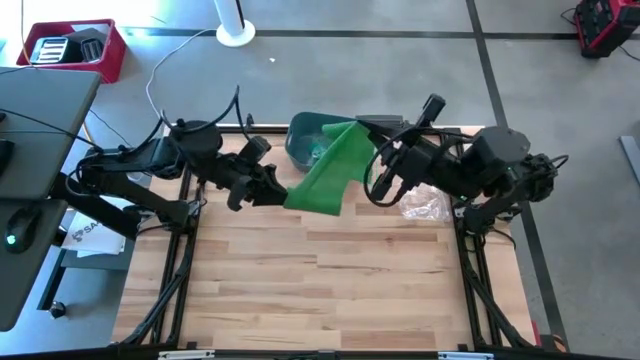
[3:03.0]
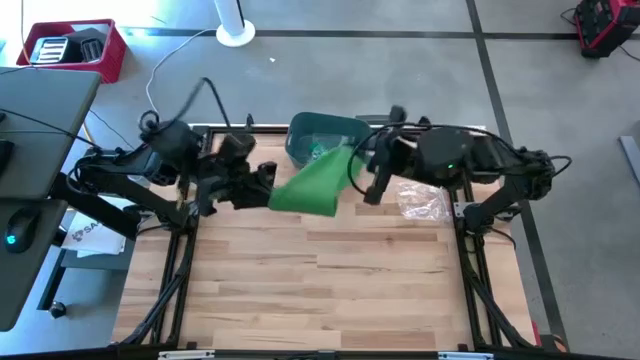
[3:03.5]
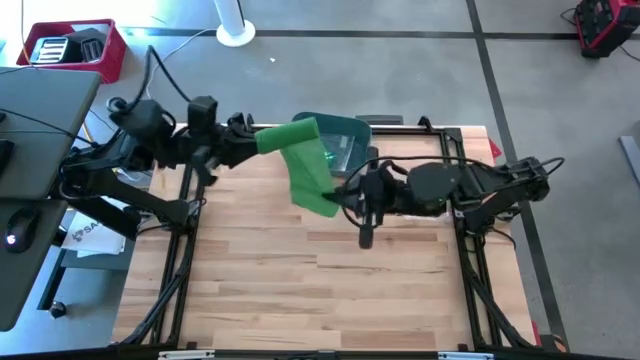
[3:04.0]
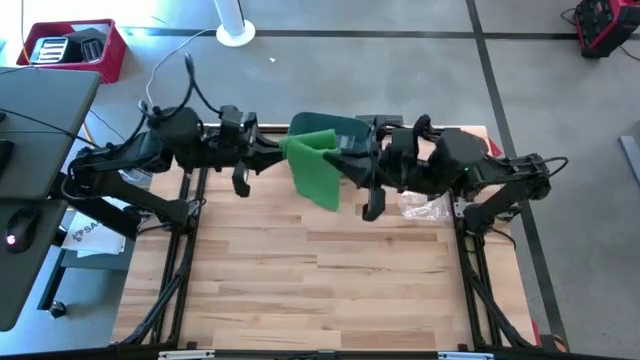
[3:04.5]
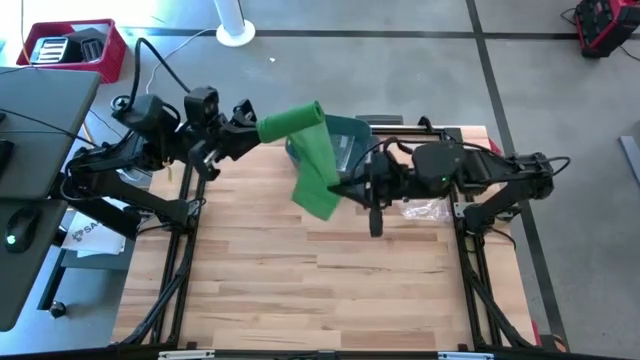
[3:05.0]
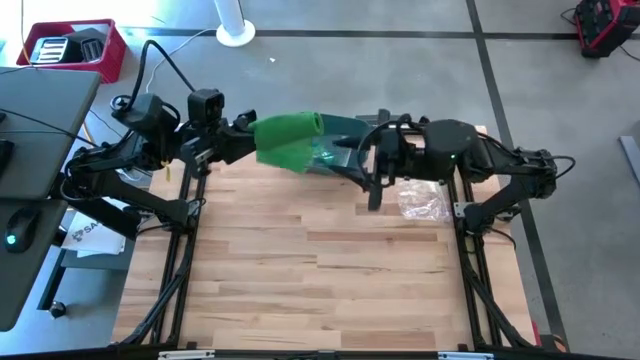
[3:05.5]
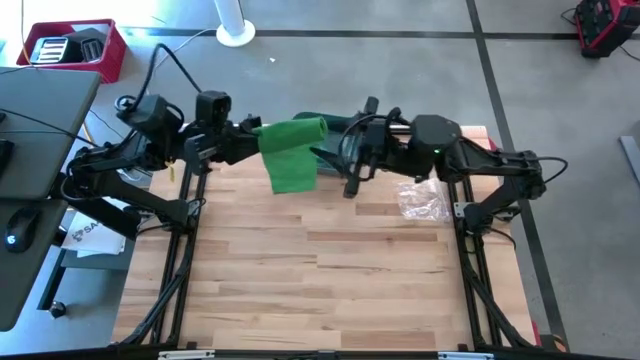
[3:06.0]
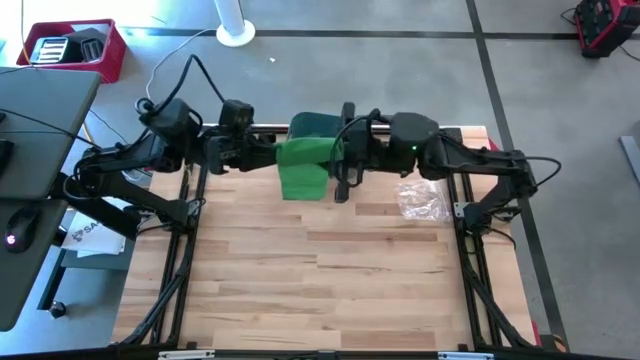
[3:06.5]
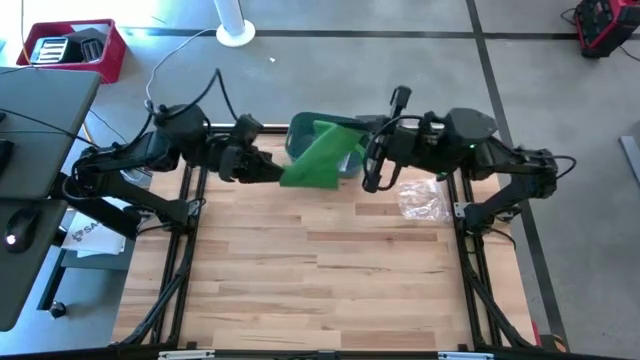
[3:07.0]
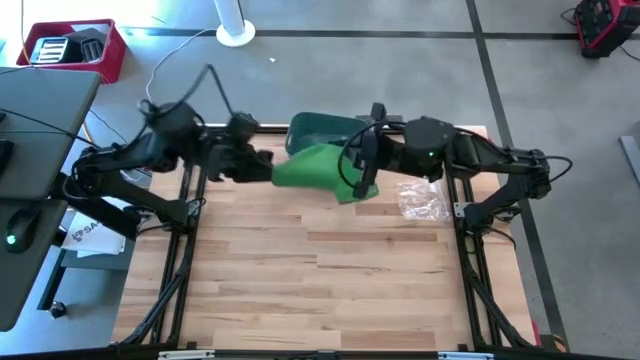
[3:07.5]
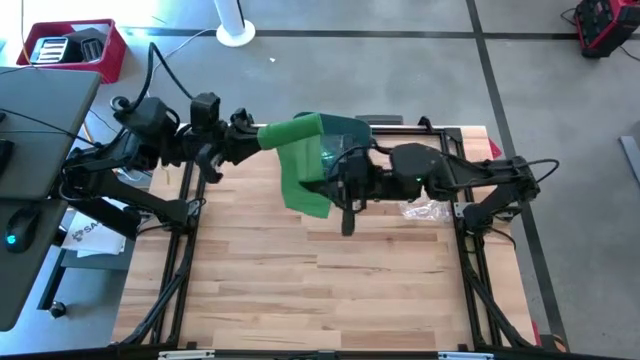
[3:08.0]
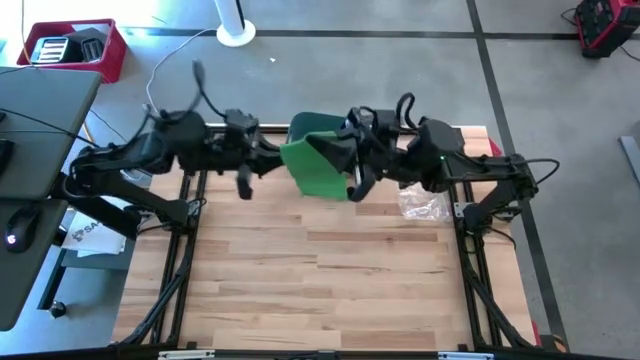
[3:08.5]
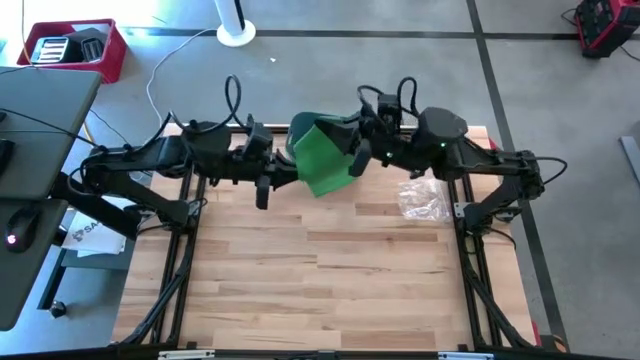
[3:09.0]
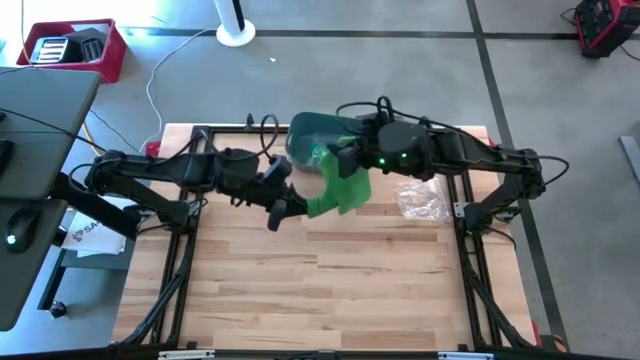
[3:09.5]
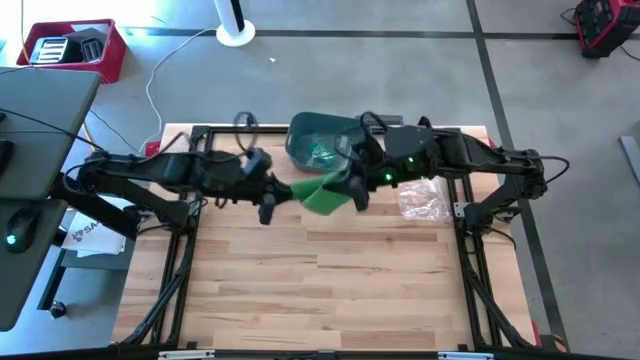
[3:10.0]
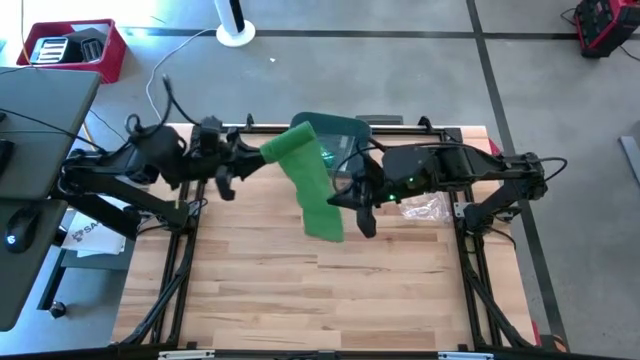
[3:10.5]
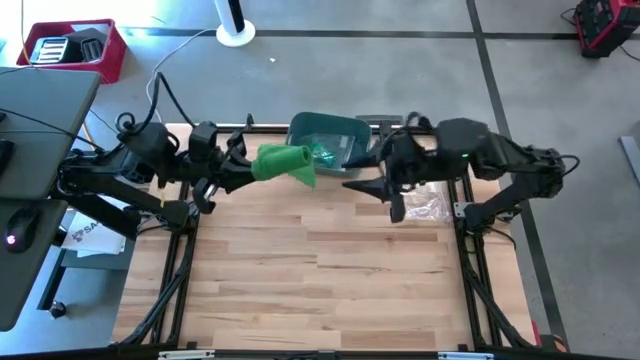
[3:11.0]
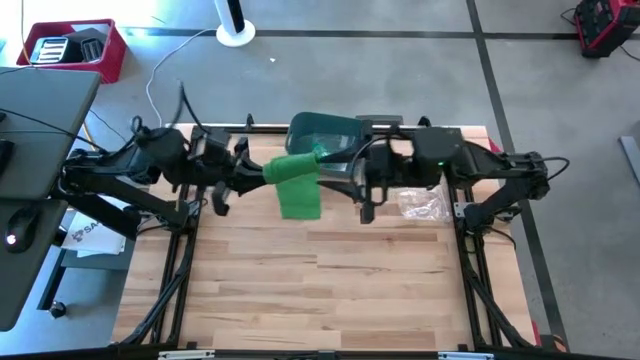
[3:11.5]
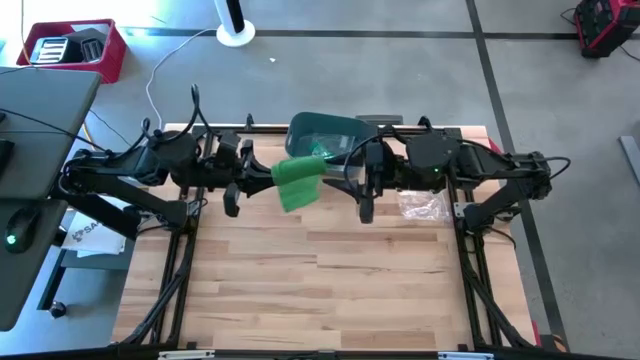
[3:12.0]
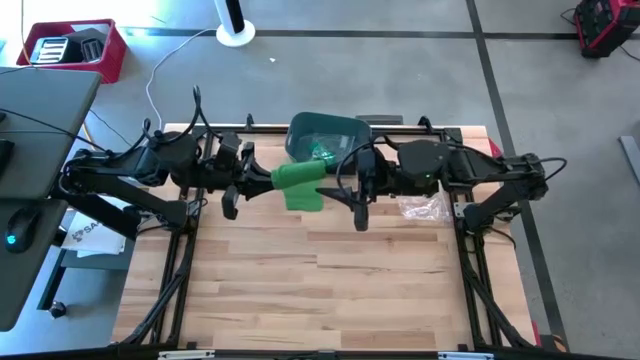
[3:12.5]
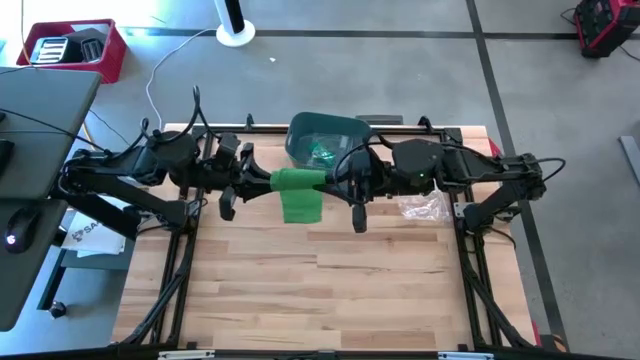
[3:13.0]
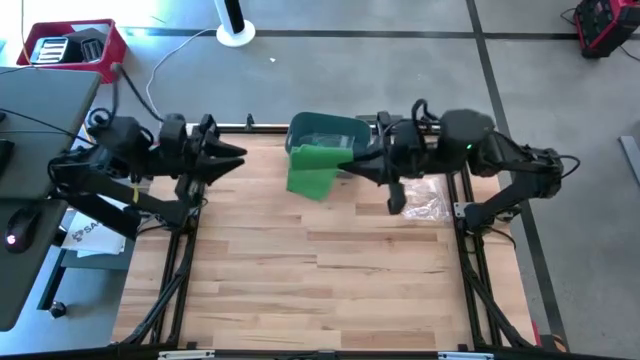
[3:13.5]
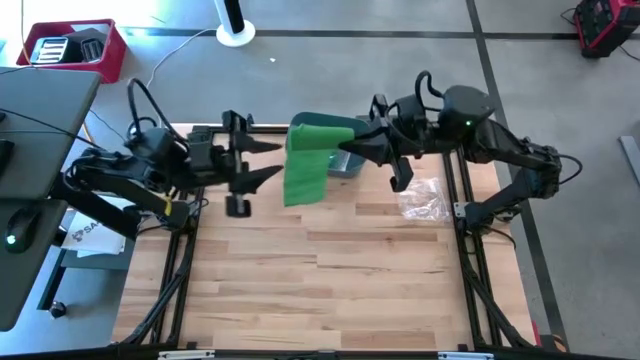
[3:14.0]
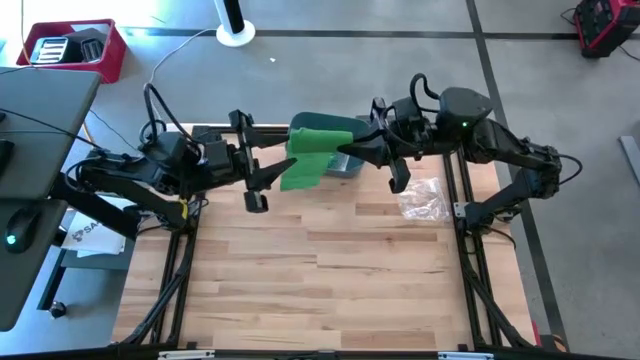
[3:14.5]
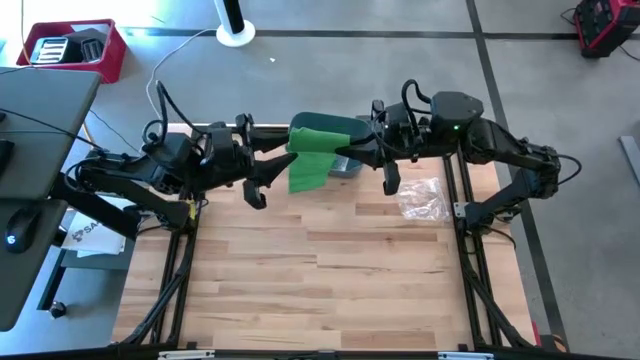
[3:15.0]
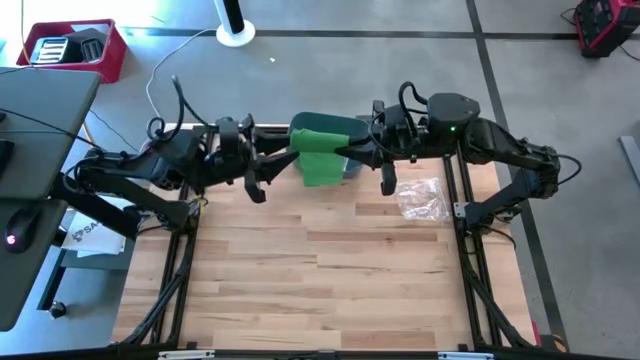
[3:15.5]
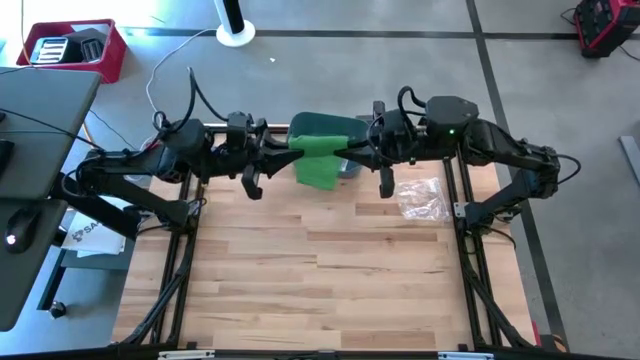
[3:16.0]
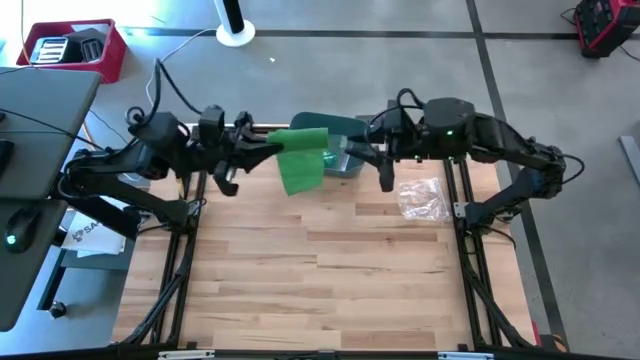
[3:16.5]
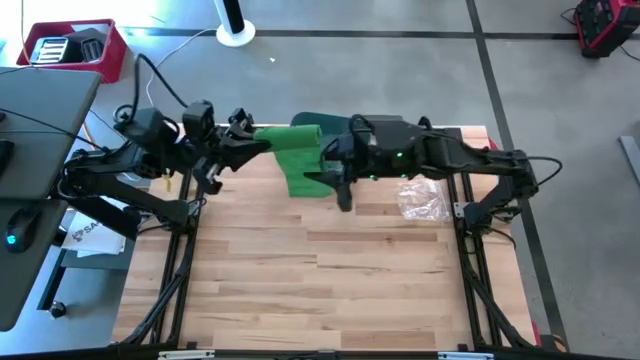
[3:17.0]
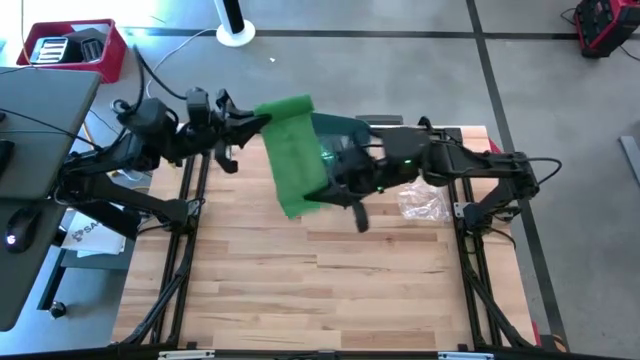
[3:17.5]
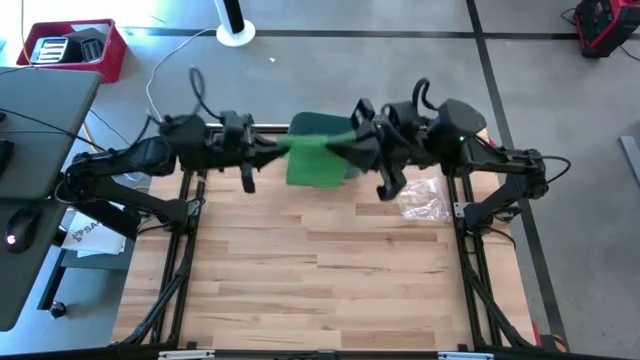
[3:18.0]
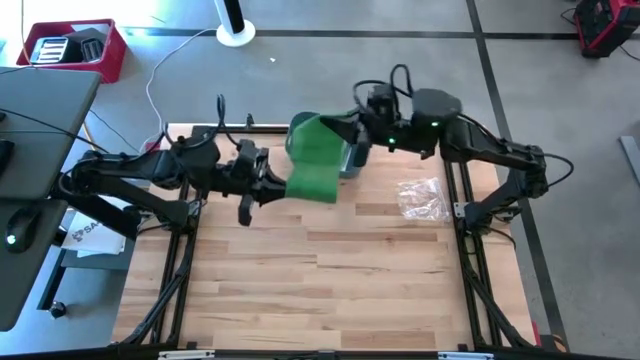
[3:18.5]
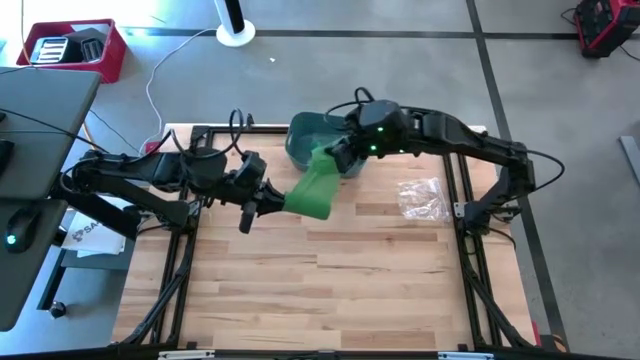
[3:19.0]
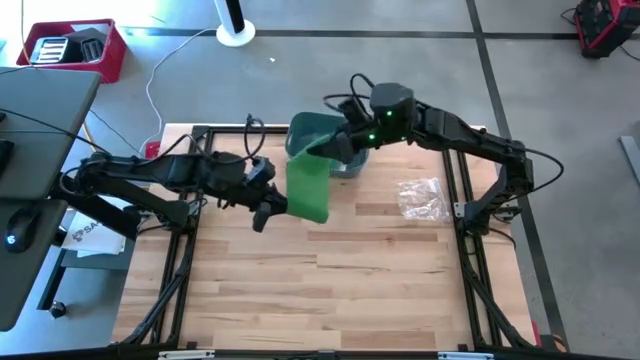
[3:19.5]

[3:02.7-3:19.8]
Task: Roll bandage
Roll the green bandage

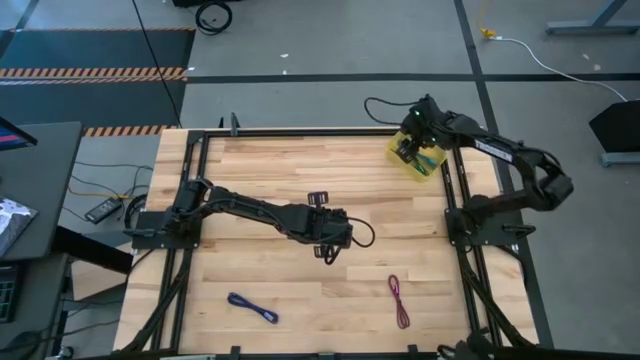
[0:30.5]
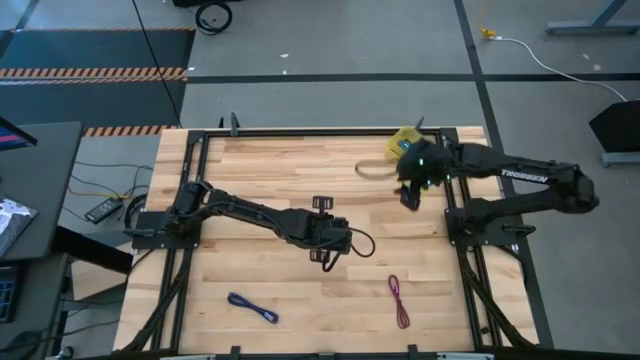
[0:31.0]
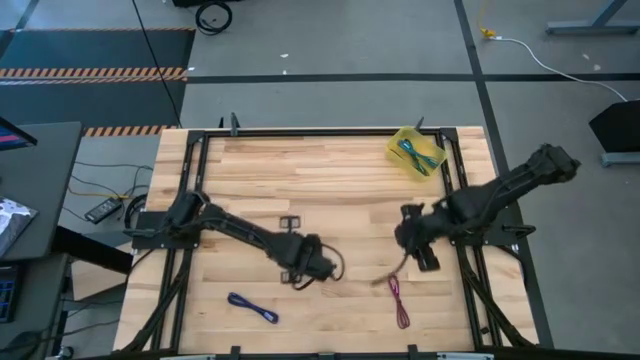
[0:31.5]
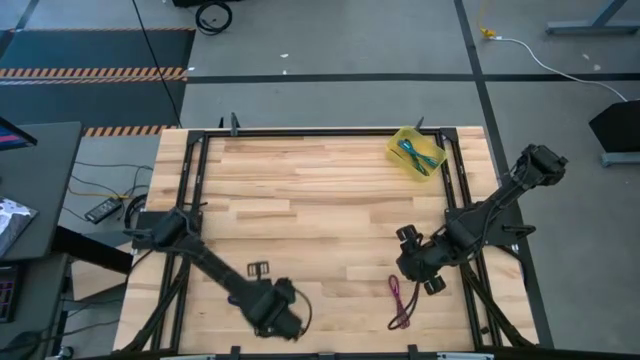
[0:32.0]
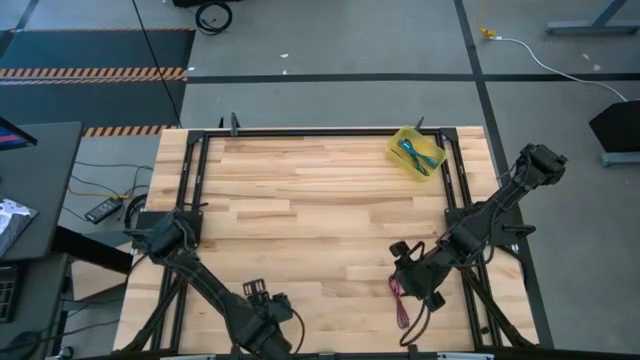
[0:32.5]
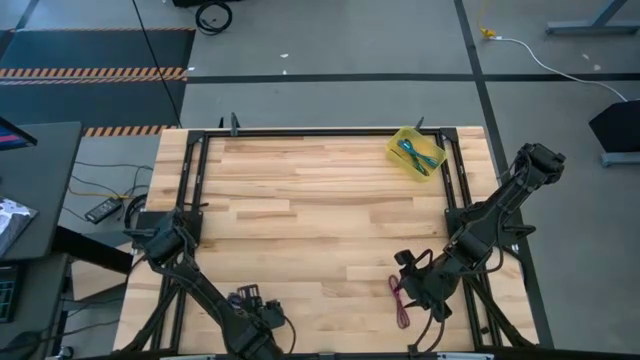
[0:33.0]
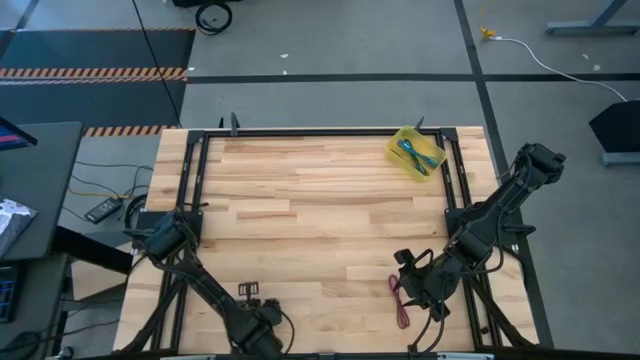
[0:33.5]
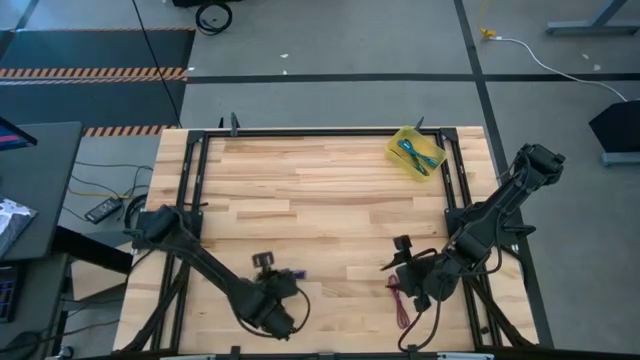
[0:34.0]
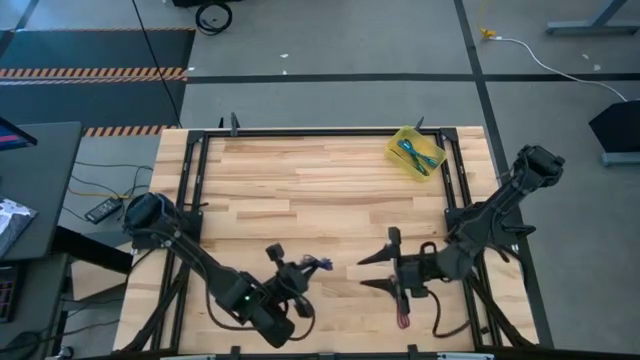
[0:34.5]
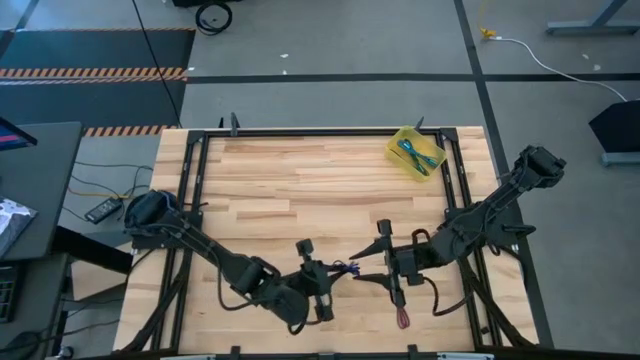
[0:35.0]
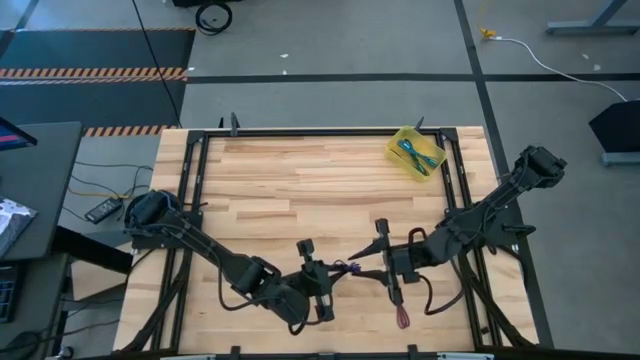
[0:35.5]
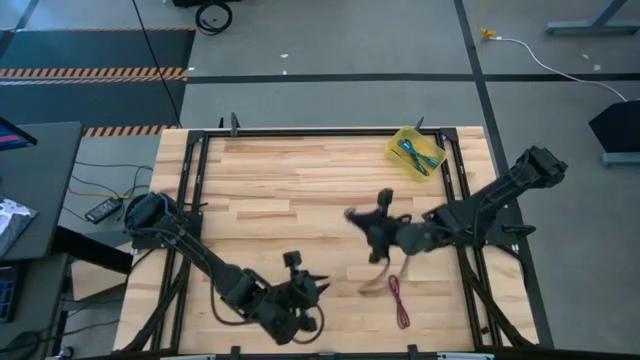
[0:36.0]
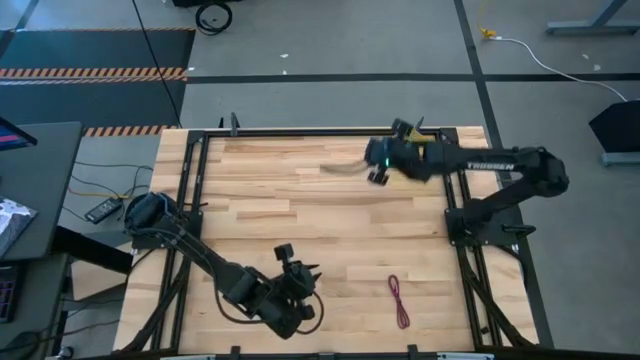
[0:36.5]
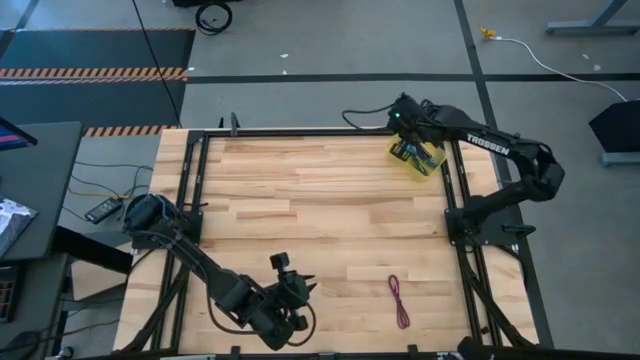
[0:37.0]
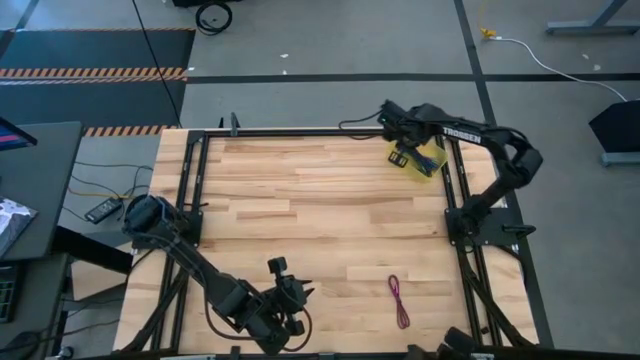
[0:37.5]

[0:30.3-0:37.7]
Task: Pick and place USB-C Cables
Put the violet charger cable into the yellow container
